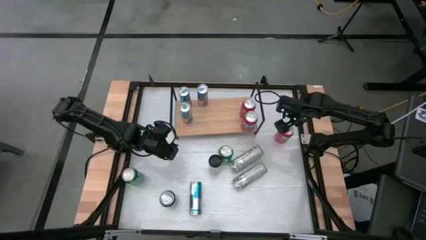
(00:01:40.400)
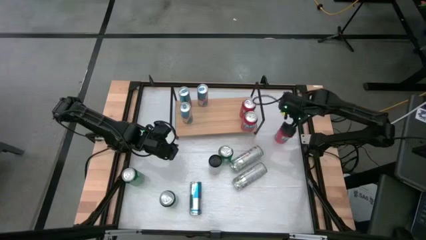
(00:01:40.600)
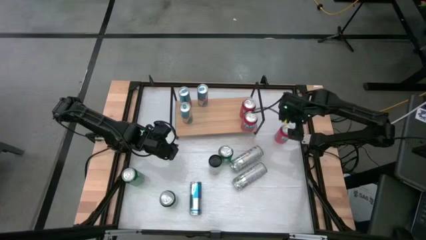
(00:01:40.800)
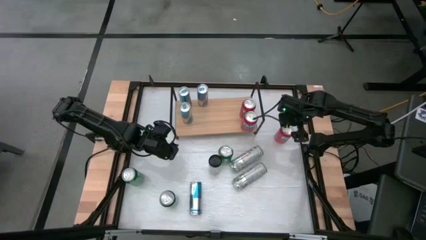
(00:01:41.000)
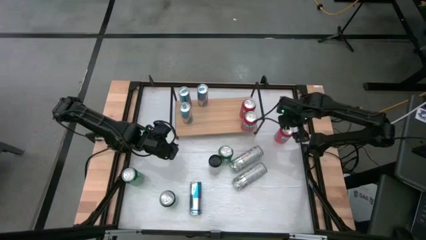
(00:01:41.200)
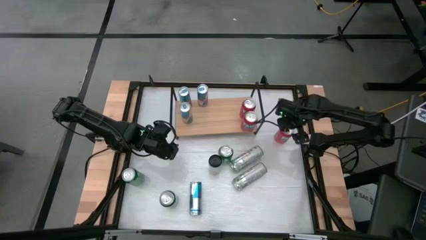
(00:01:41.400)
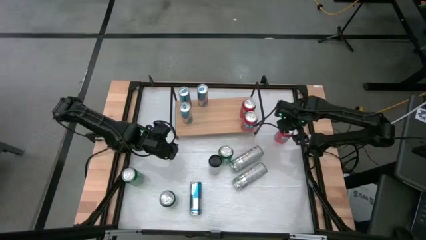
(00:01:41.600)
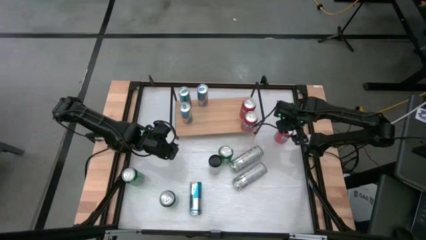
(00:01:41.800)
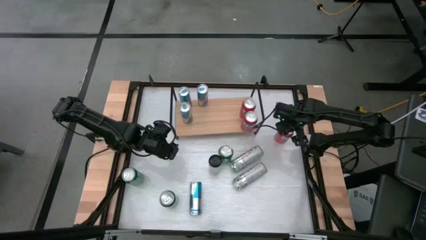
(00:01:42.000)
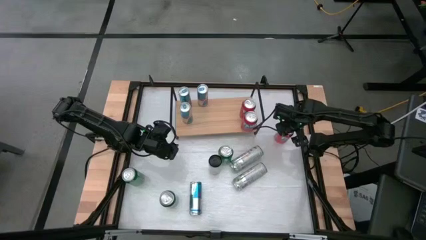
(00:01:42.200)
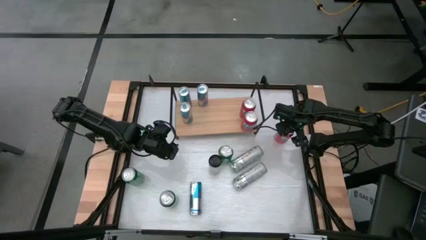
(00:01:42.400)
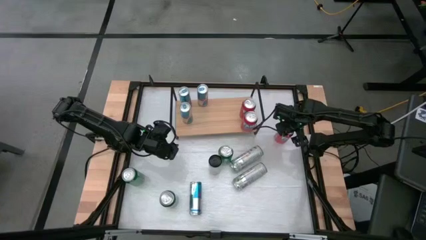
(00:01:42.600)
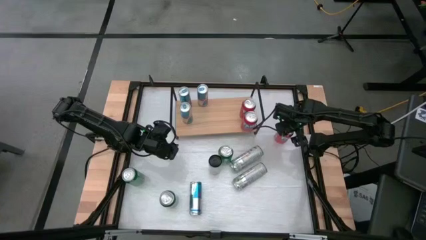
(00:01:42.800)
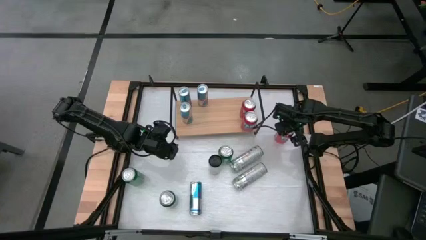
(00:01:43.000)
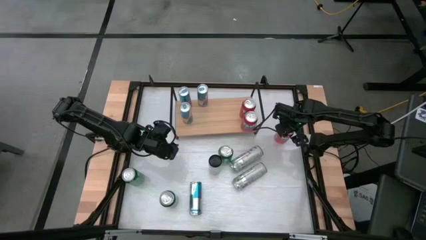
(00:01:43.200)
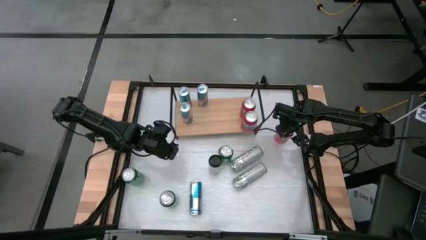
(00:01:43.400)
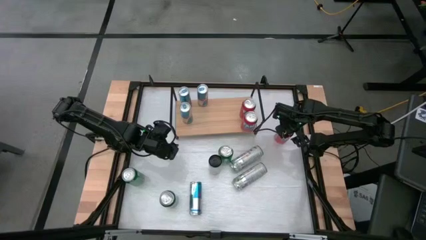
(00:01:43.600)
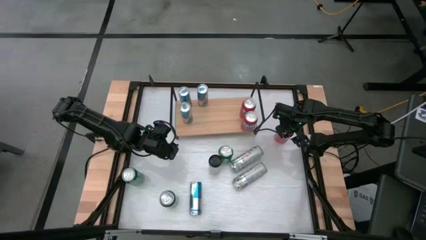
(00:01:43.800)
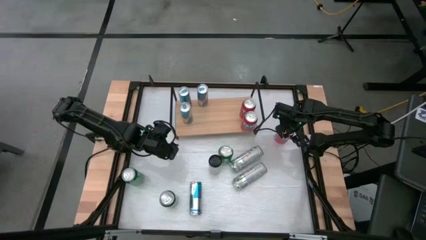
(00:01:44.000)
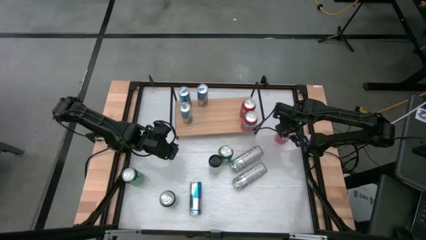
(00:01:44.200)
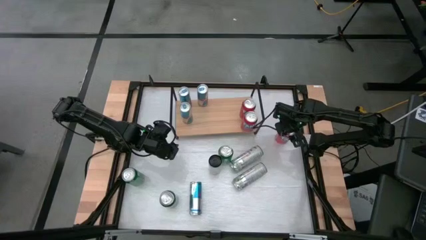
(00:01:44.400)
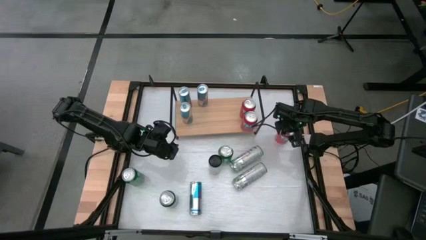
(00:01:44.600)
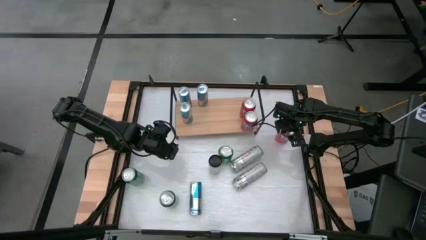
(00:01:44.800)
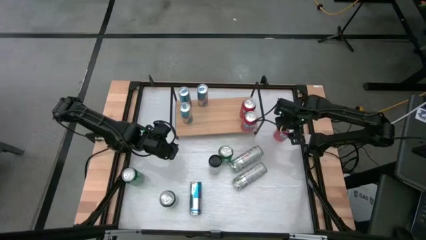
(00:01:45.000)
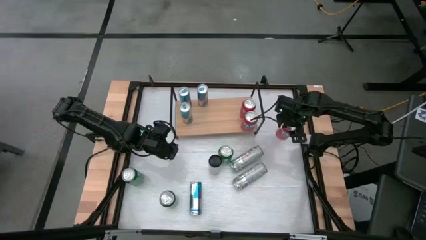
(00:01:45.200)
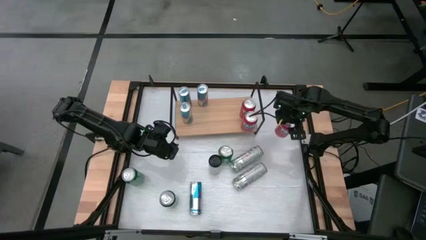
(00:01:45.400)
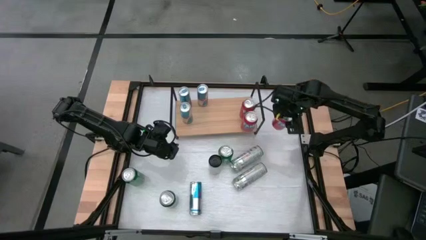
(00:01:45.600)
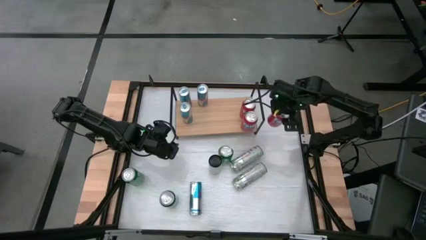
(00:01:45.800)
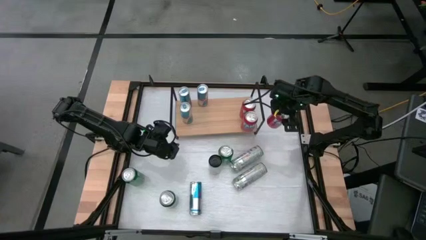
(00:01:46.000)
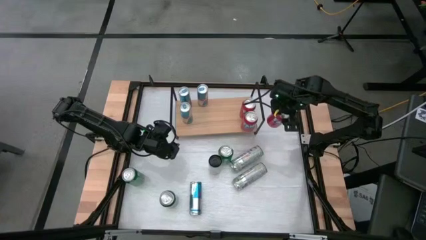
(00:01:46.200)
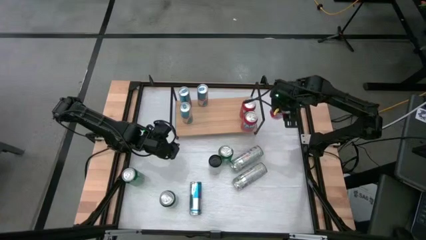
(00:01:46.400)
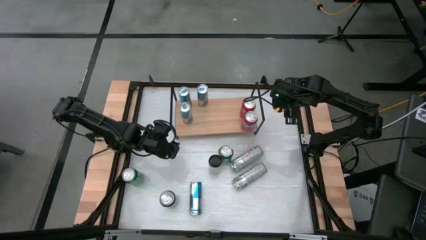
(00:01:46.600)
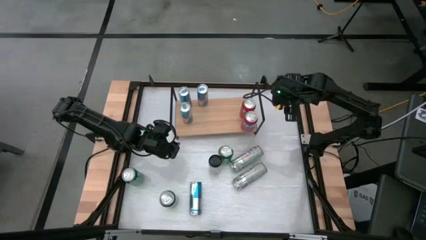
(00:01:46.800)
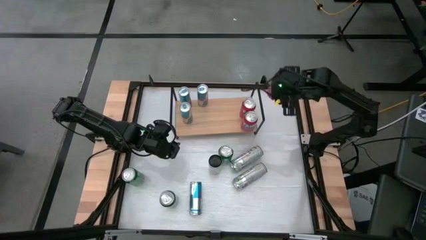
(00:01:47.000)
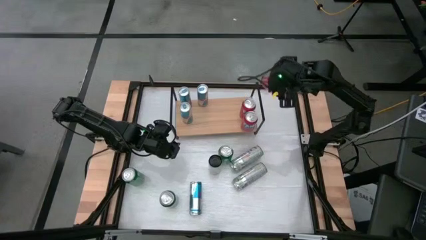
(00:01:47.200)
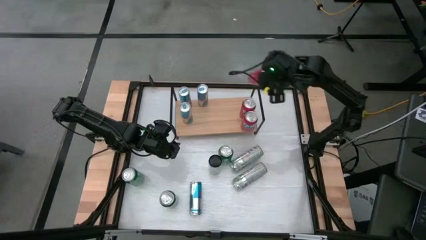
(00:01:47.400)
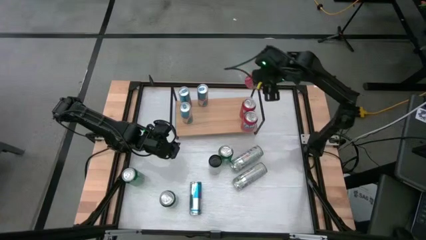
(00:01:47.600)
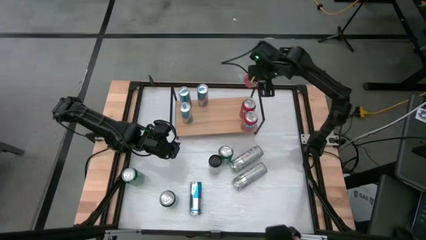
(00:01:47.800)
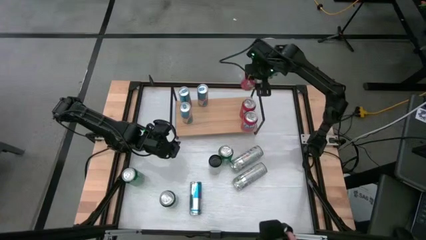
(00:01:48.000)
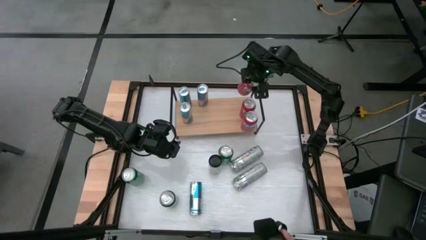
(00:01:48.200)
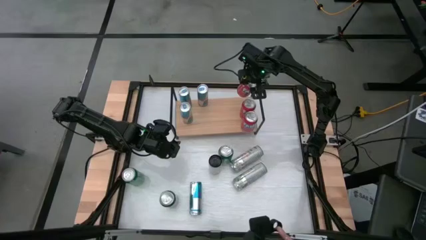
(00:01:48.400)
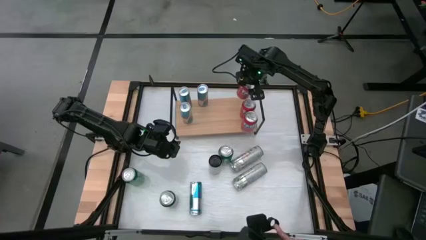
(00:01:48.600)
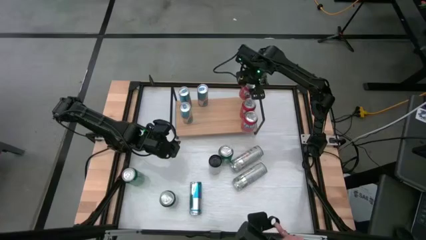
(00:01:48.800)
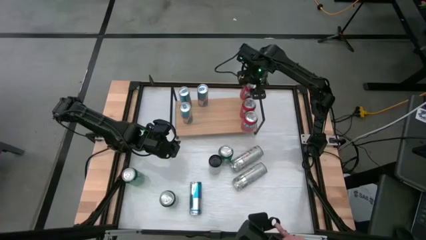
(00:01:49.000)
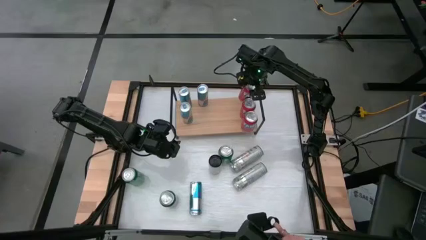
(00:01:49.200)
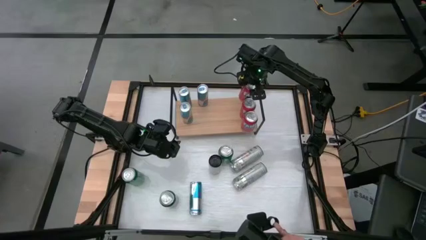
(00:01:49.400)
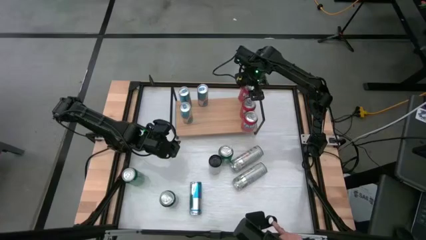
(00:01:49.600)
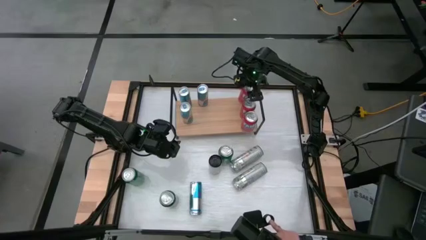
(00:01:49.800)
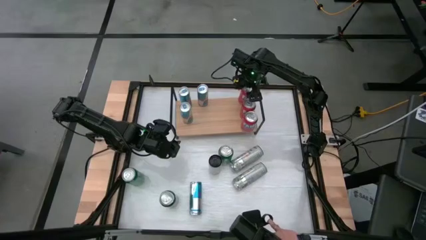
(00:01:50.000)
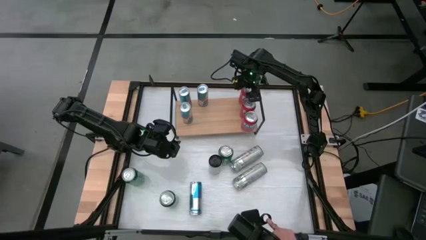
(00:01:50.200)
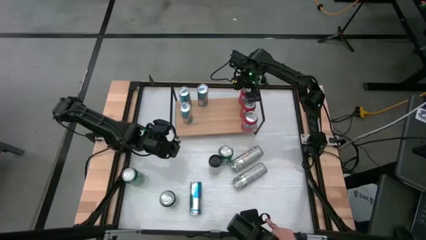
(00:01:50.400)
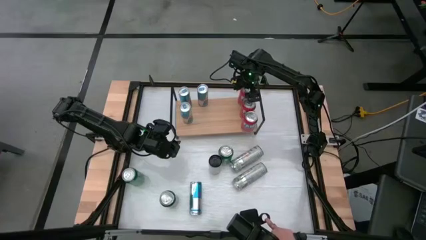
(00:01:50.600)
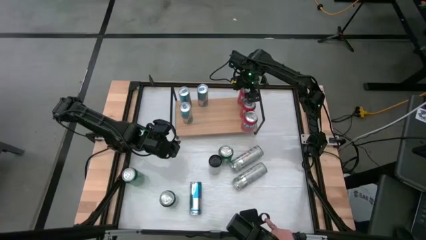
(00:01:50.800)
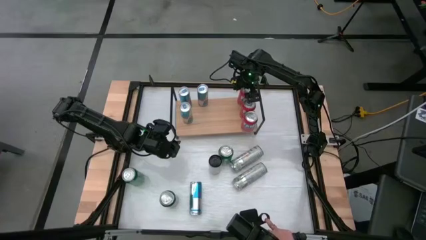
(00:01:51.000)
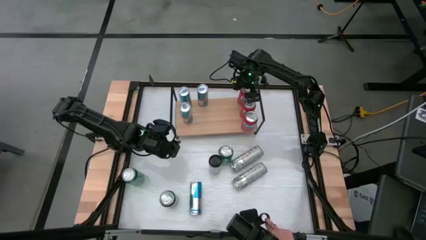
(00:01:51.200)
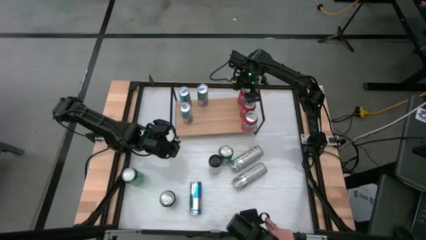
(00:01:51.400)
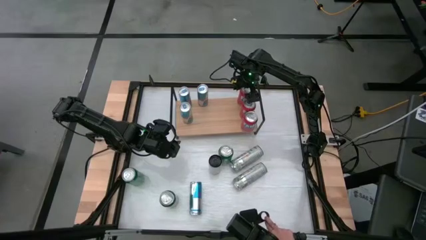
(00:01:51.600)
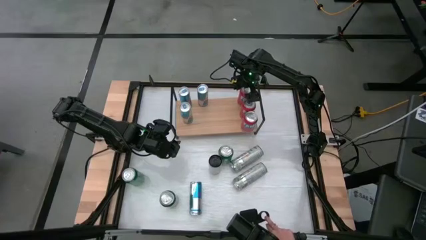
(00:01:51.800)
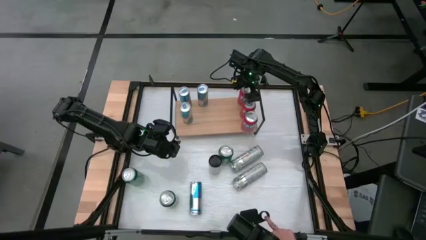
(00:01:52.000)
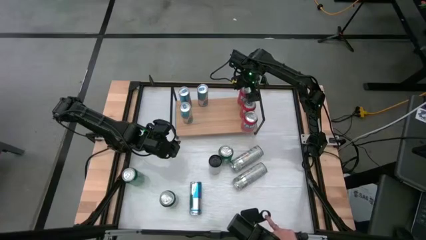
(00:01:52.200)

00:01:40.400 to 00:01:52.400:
Task: Sort soda cans
Put the orange soda can on the shelf and align with the other orange soda cans
